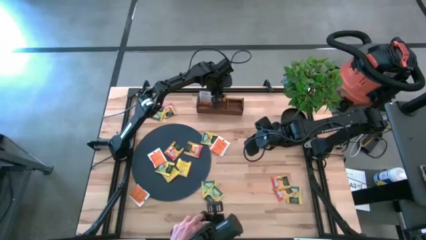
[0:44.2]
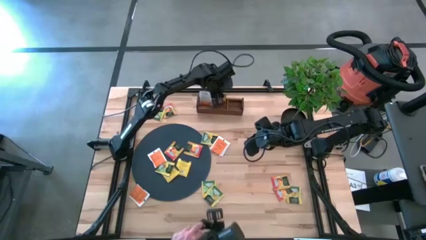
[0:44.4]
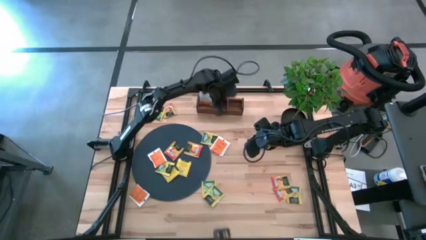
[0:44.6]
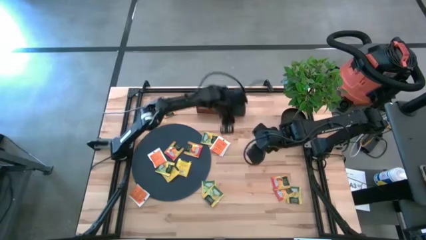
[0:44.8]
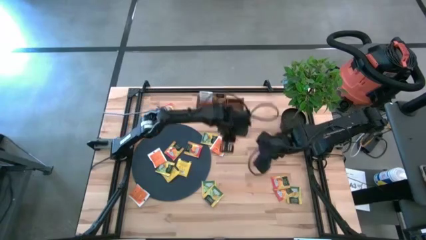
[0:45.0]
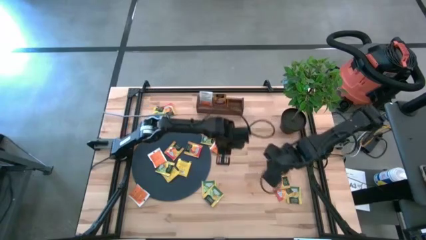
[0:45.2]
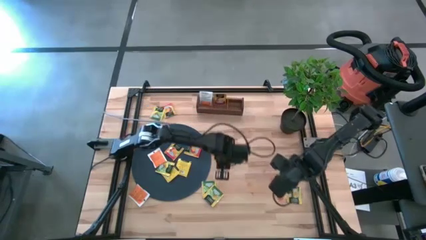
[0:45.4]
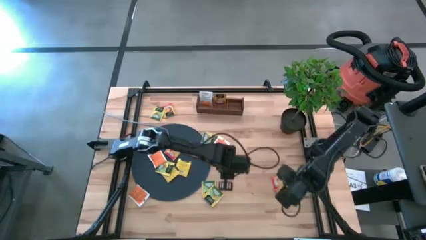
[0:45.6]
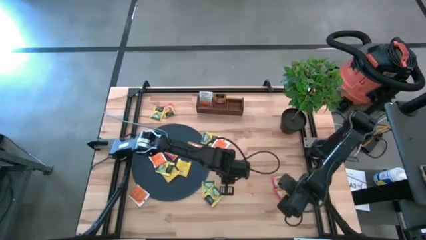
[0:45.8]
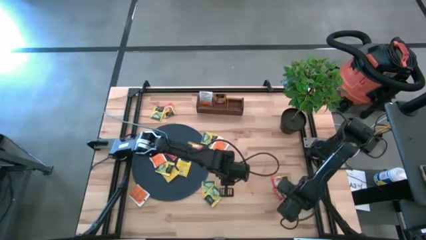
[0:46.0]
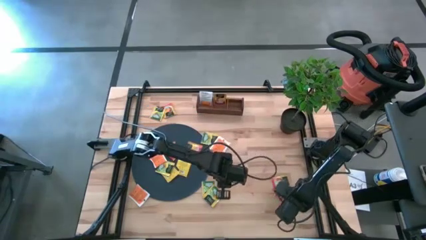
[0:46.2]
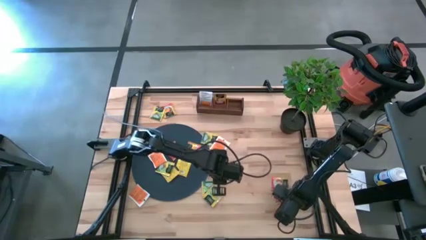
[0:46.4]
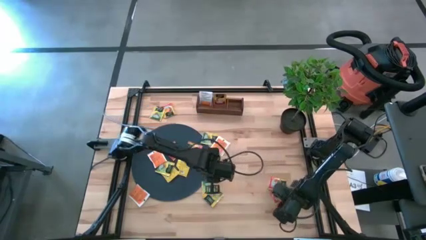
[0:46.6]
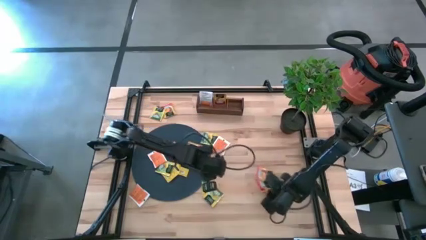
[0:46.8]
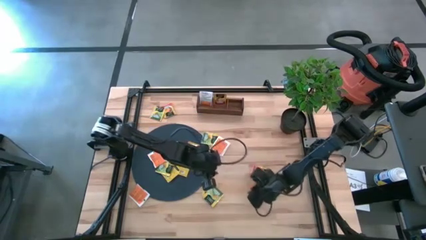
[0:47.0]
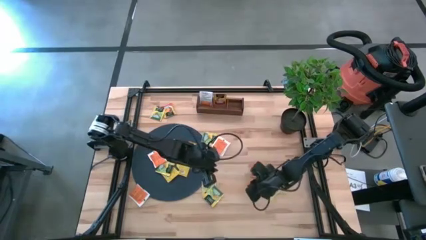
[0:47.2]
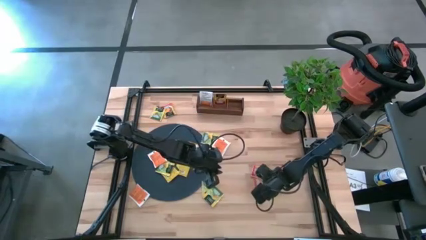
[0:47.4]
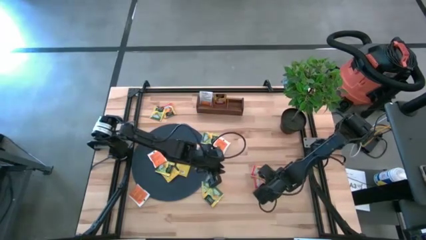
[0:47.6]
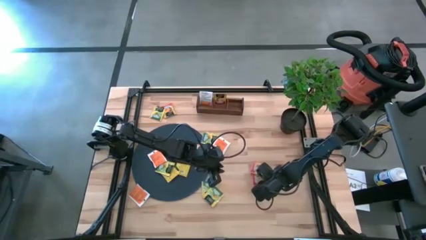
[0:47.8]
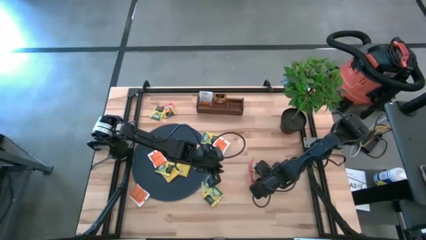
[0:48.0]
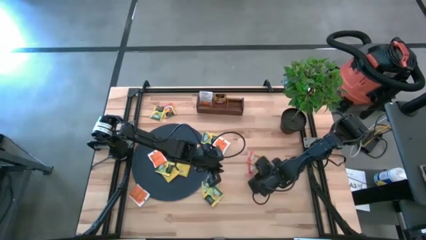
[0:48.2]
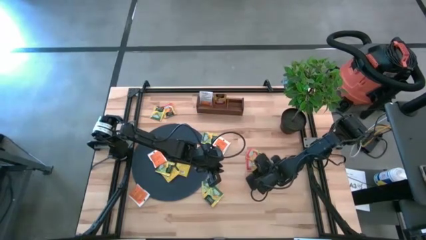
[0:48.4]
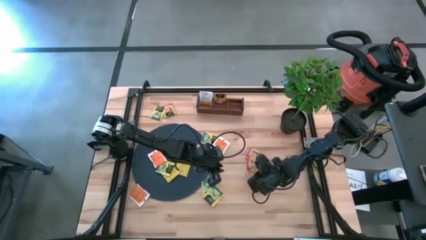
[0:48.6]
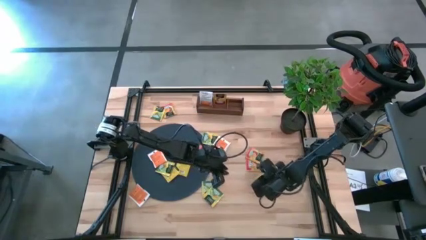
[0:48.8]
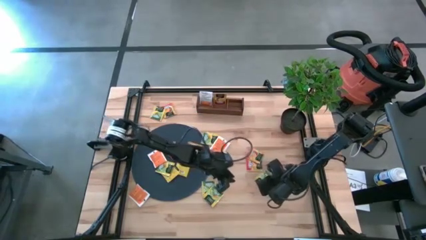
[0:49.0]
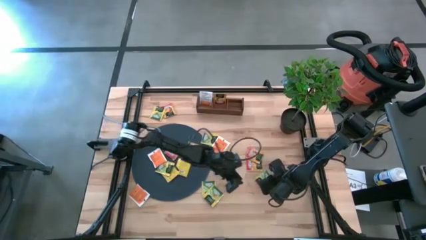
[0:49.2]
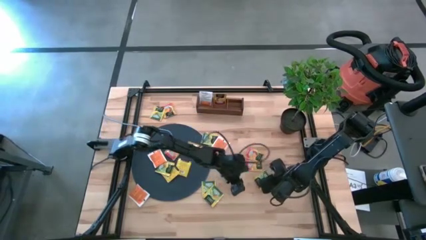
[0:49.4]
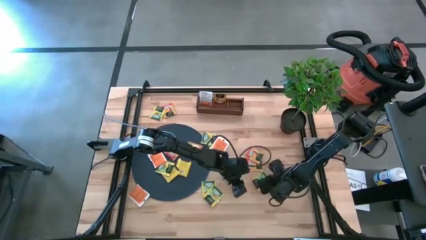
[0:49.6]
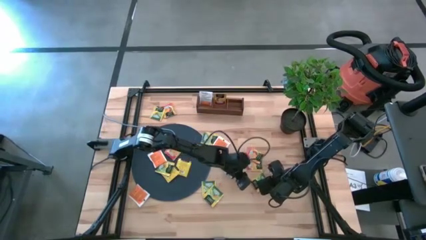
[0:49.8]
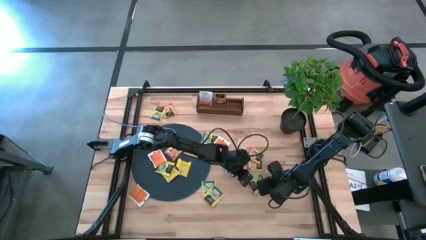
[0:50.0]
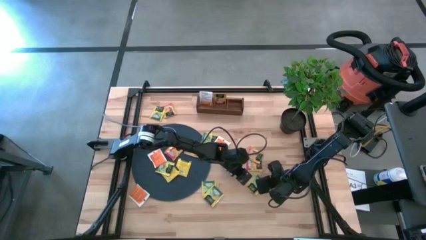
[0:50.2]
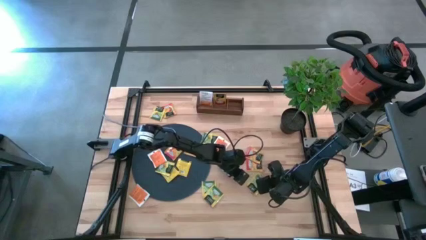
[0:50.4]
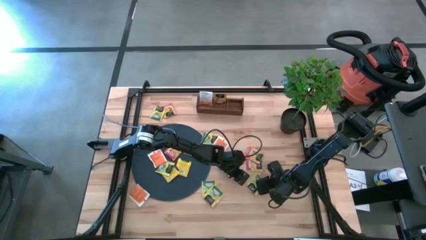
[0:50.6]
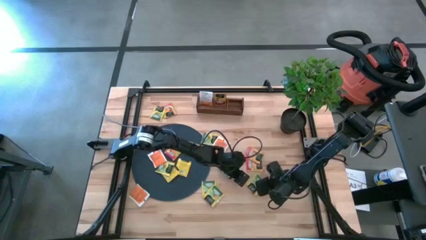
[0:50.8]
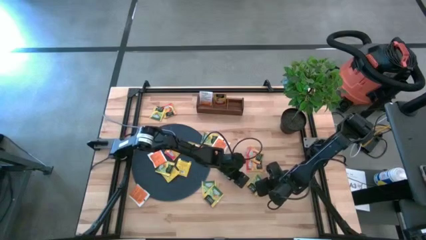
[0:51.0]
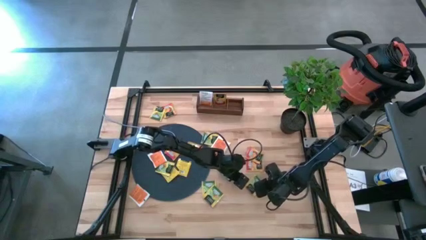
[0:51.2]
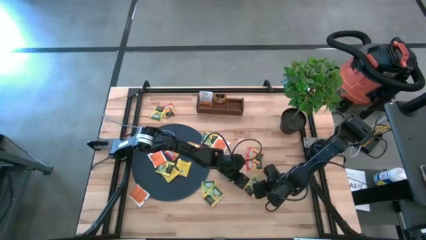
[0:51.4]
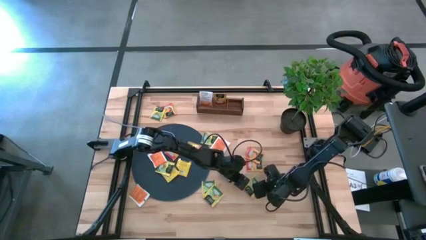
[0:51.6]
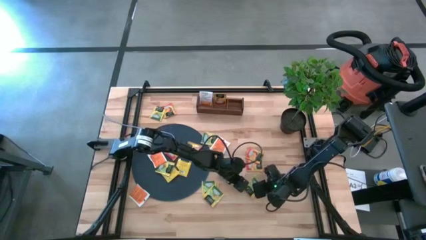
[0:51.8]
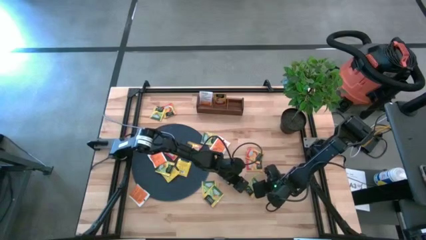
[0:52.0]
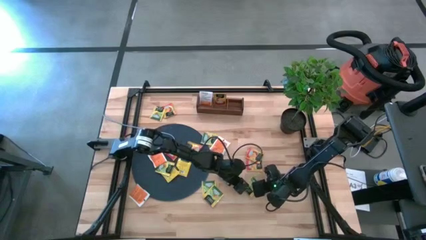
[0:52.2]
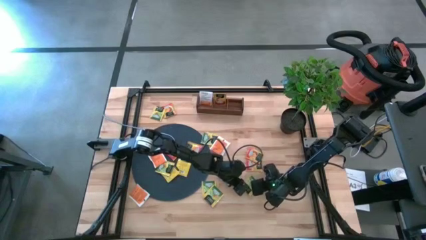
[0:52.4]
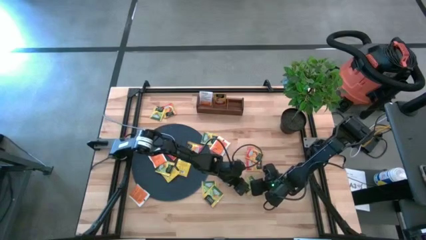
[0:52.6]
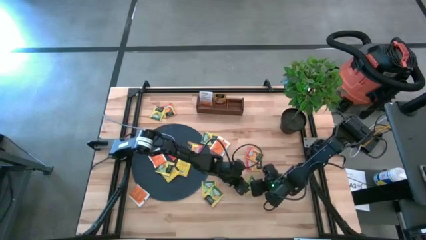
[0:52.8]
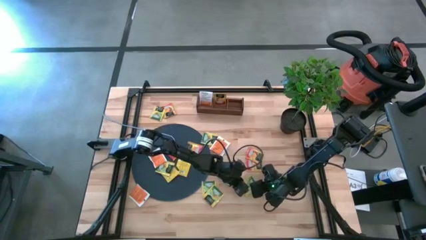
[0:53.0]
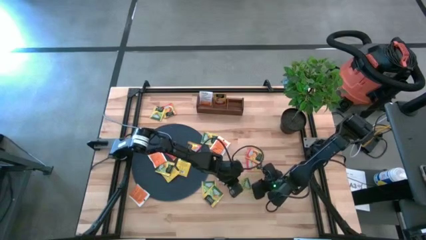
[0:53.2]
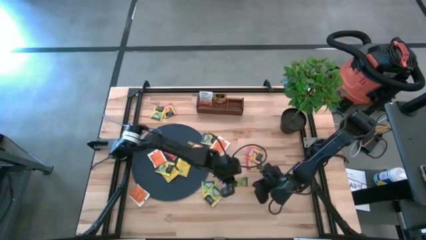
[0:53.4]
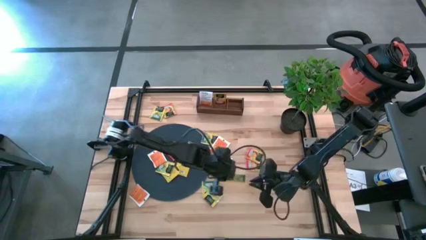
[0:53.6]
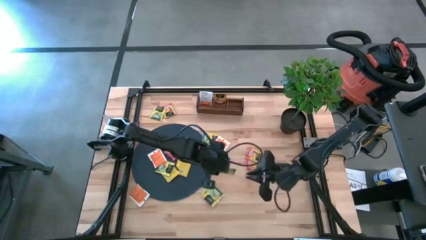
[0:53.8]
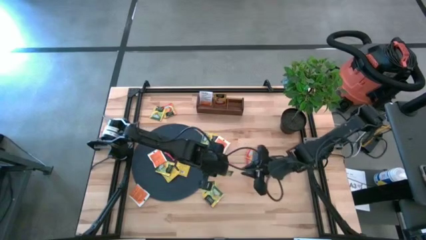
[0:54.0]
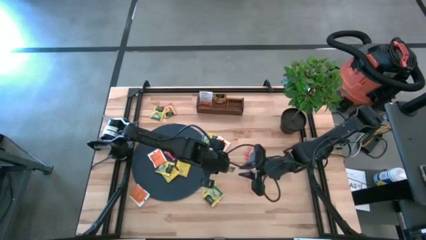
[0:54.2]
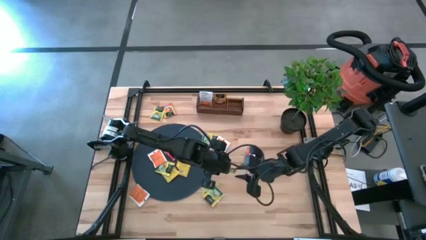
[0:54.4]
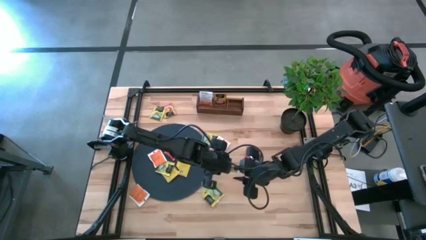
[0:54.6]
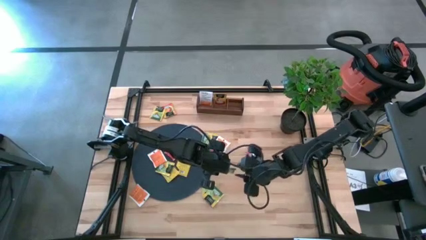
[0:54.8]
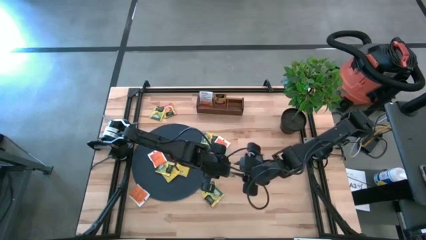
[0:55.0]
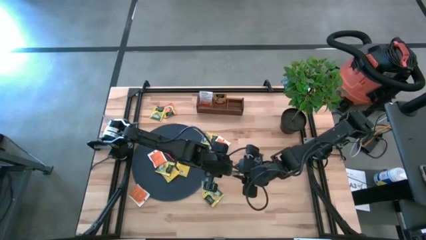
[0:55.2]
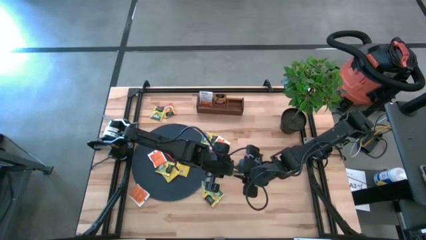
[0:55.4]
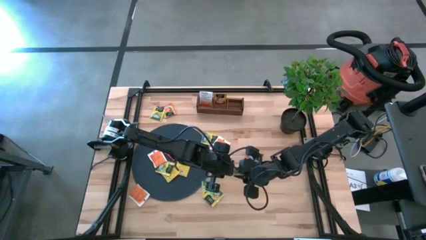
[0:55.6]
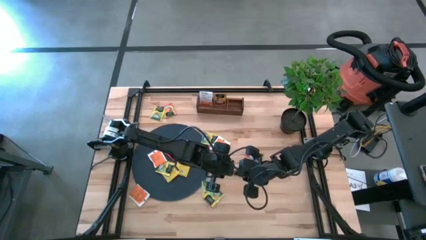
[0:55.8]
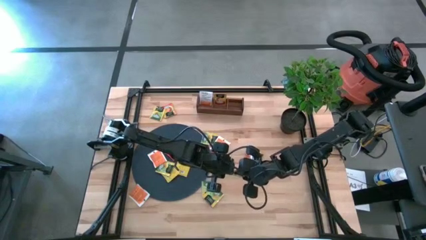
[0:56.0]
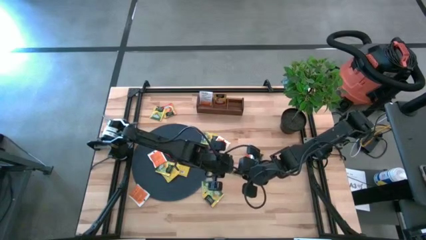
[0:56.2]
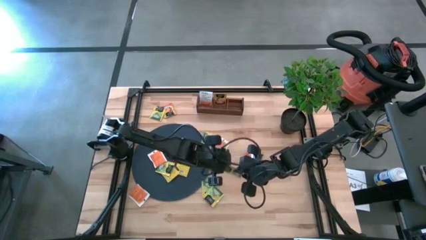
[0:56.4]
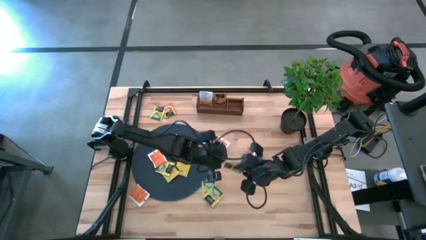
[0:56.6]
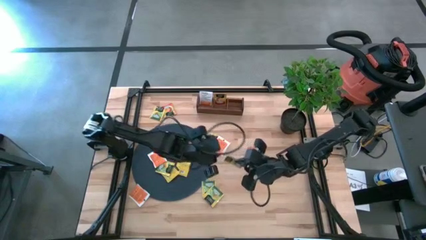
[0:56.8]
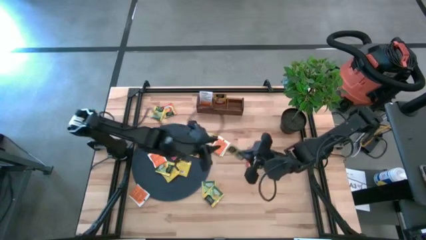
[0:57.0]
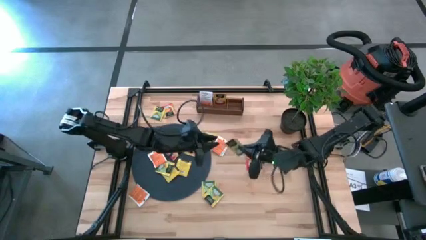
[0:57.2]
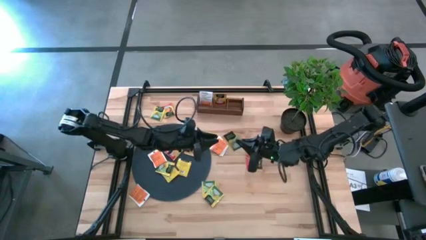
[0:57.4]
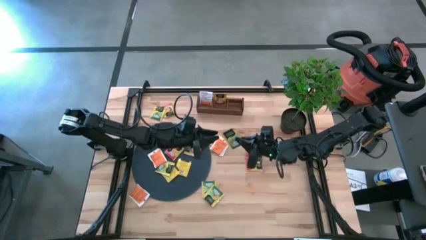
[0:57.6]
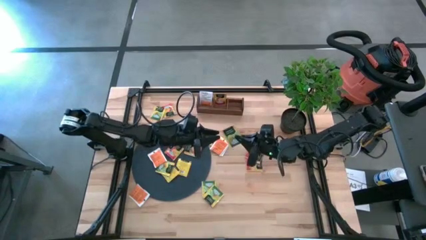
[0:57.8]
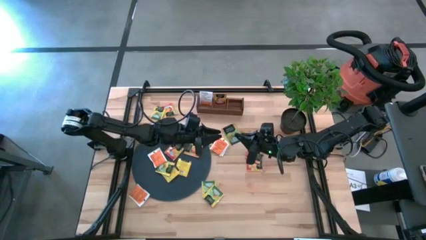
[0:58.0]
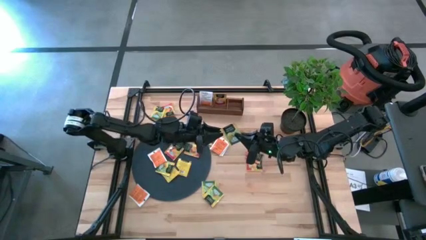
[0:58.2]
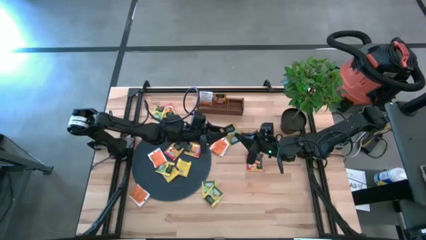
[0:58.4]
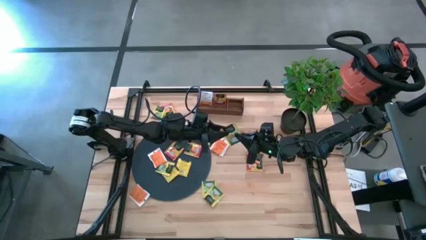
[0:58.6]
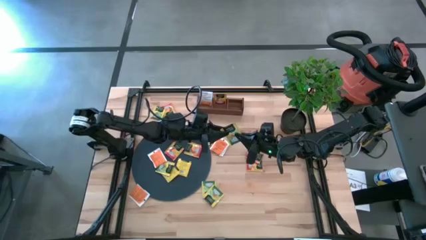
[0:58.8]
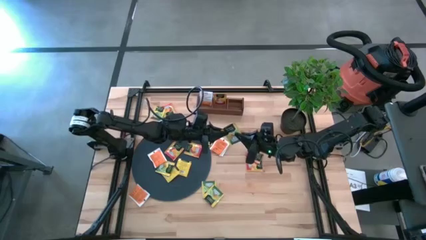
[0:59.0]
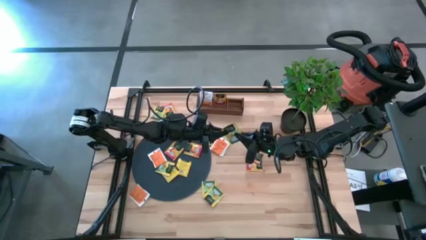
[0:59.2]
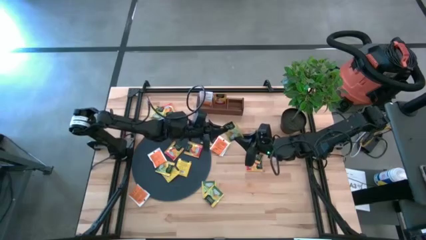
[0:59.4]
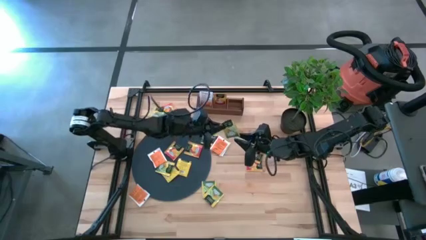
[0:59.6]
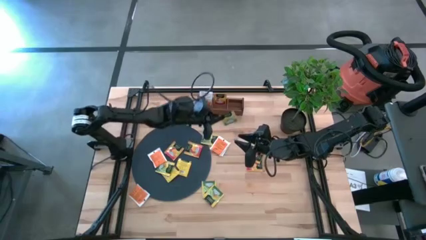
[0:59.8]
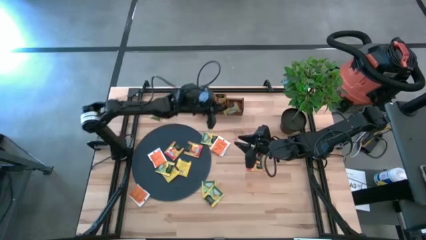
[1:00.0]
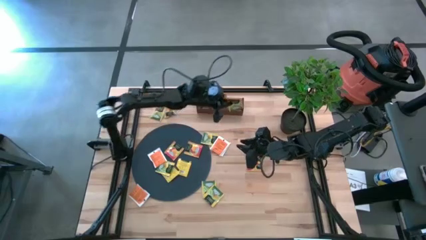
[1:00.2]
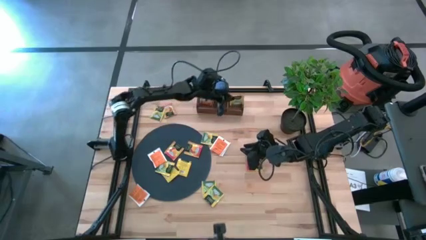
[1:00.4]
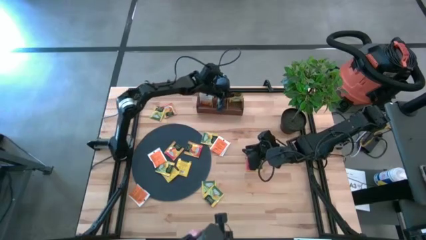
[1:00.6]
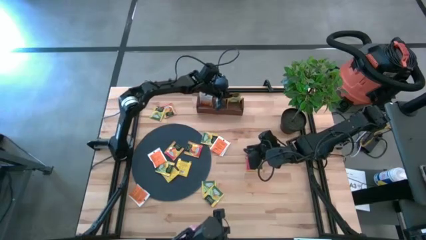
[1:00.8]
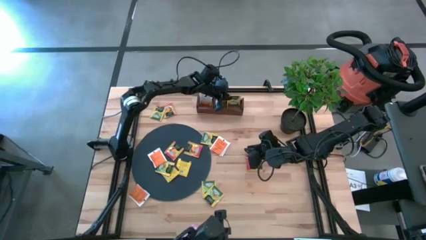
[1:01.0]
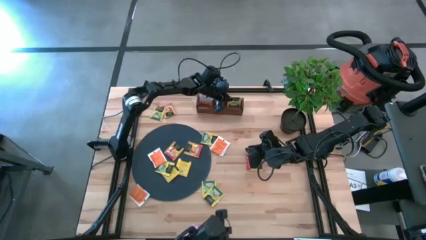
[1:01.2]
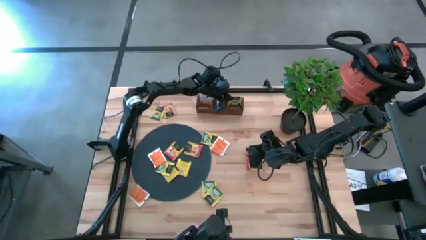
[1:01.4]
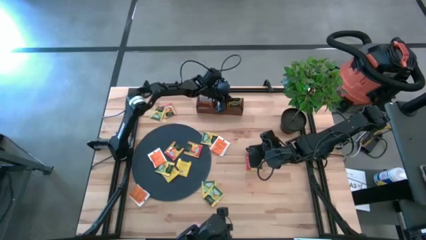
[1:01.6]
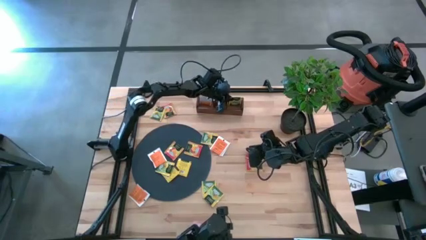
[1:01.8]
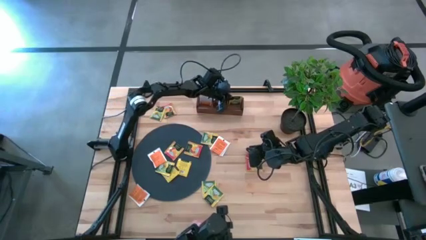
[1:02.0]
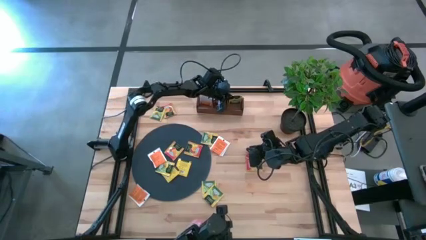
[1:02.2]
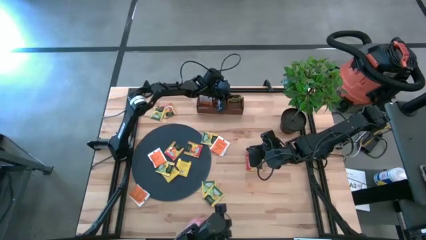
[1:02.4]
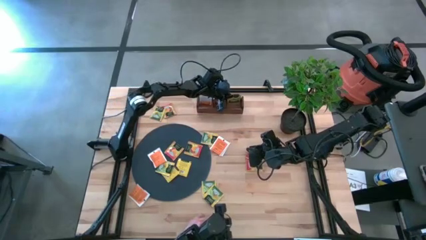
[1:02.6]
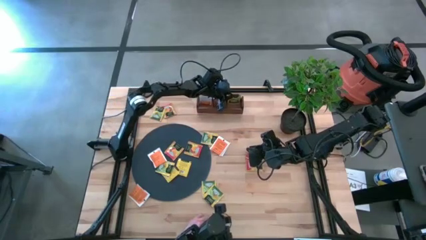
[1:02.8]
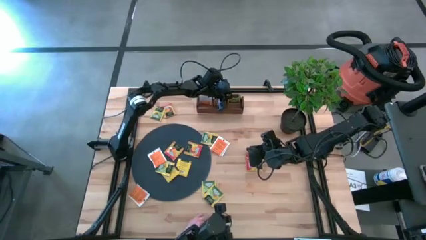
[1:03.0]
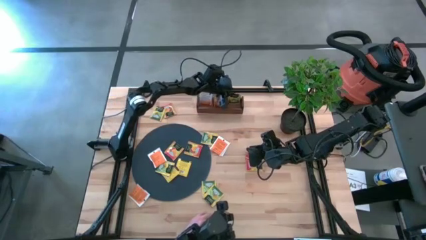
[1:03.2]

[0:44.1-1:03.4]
Task: Pick & Place Tea
Put the green tea bag into the right section of the wooden organizer
